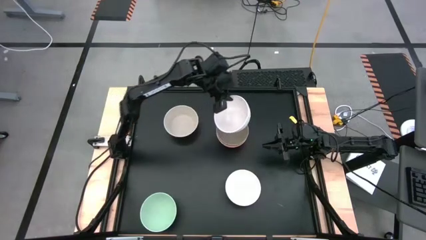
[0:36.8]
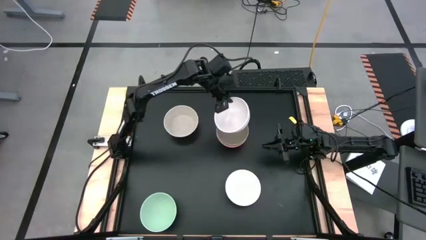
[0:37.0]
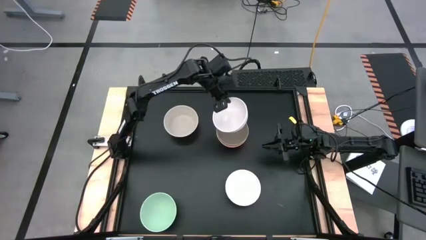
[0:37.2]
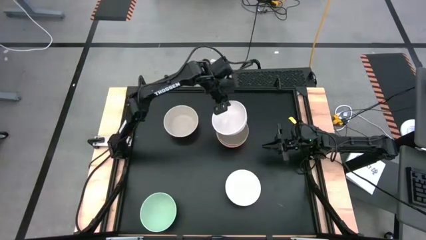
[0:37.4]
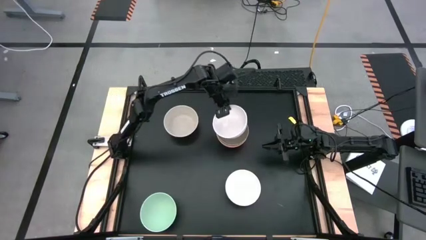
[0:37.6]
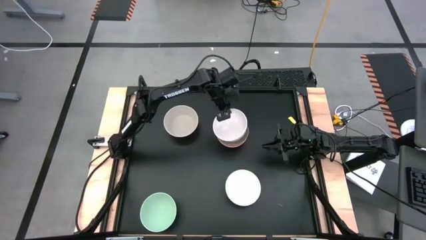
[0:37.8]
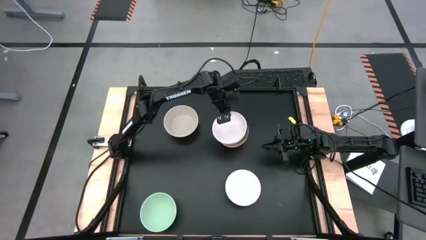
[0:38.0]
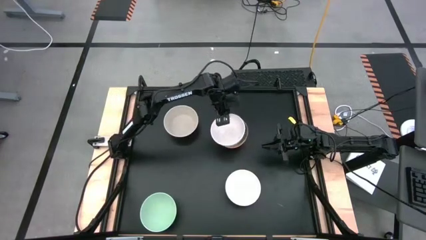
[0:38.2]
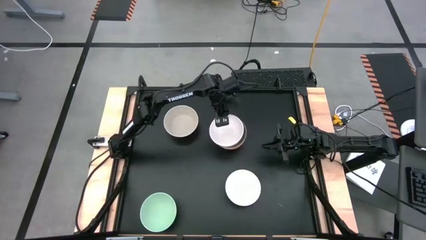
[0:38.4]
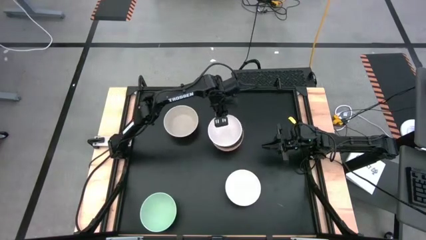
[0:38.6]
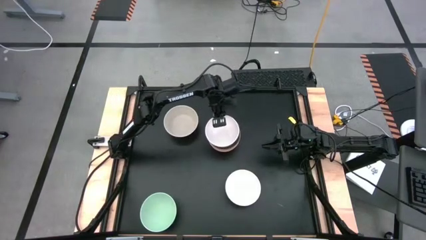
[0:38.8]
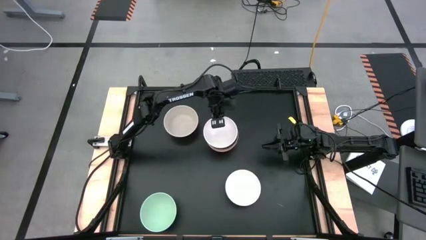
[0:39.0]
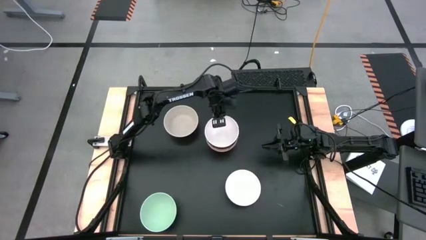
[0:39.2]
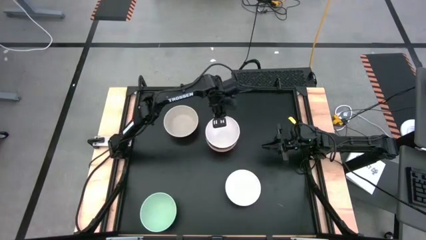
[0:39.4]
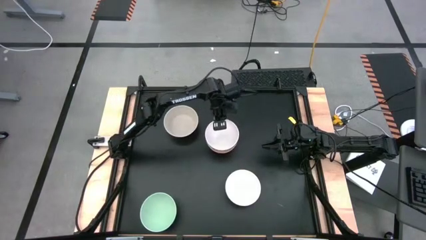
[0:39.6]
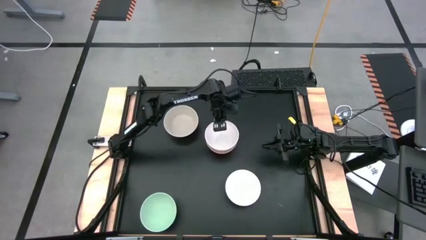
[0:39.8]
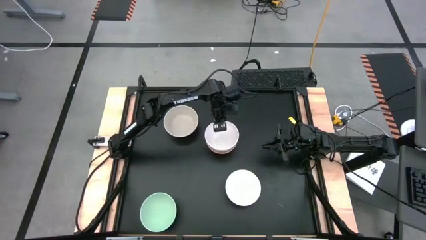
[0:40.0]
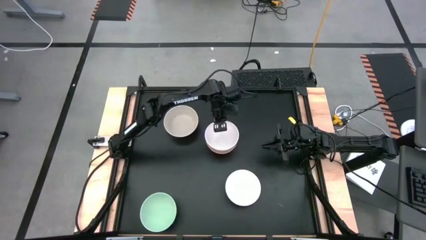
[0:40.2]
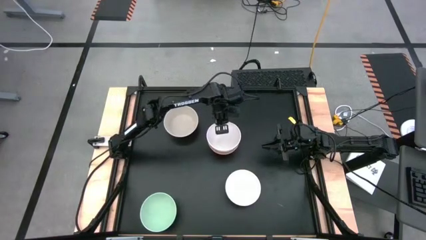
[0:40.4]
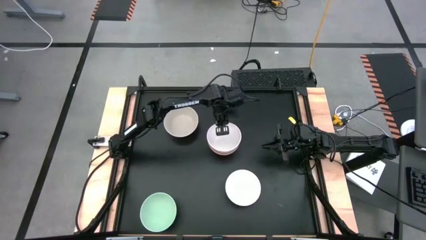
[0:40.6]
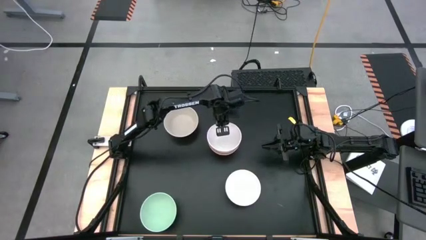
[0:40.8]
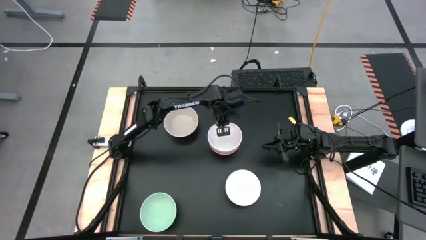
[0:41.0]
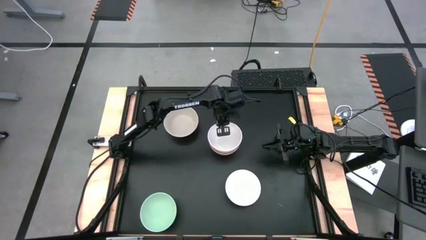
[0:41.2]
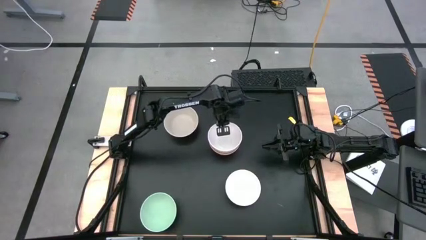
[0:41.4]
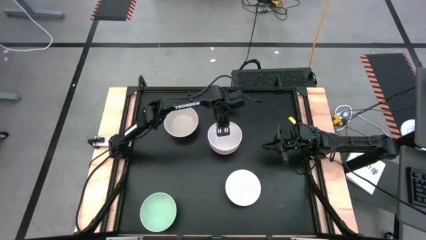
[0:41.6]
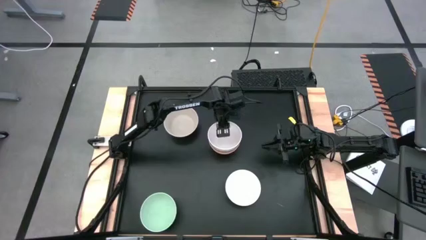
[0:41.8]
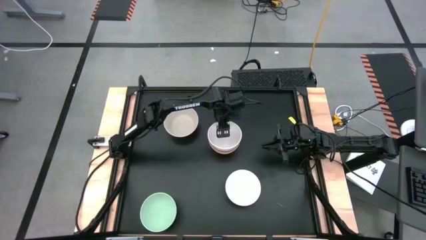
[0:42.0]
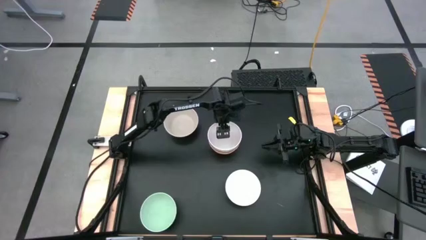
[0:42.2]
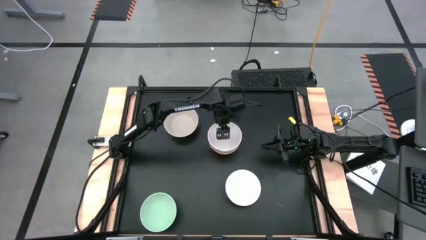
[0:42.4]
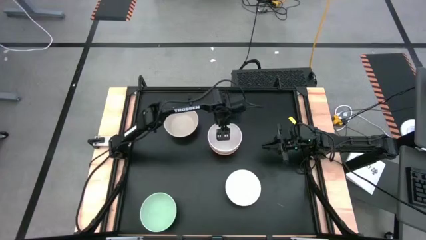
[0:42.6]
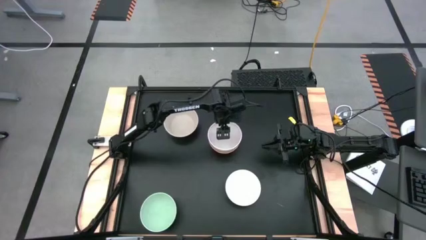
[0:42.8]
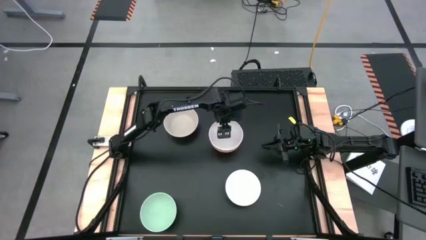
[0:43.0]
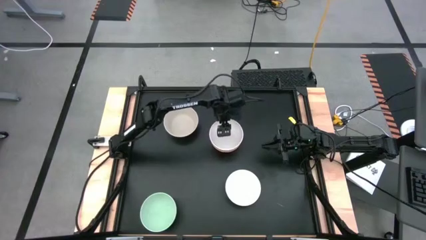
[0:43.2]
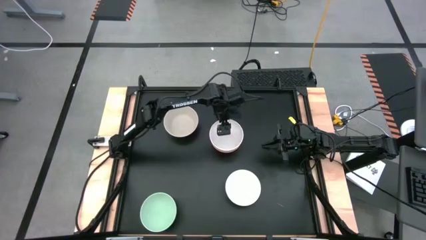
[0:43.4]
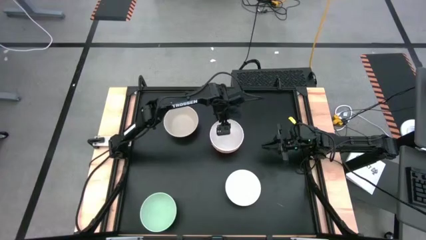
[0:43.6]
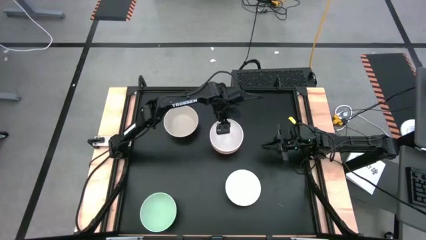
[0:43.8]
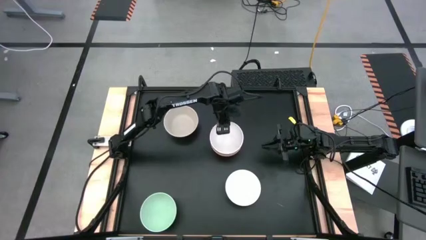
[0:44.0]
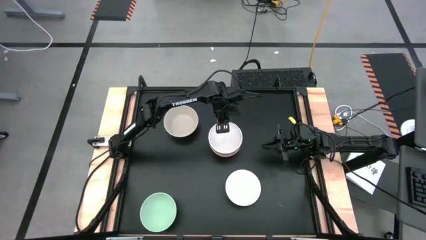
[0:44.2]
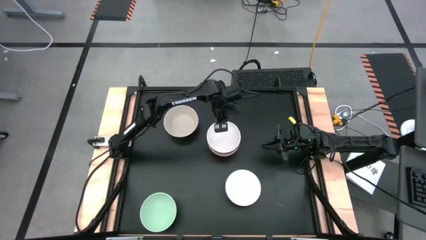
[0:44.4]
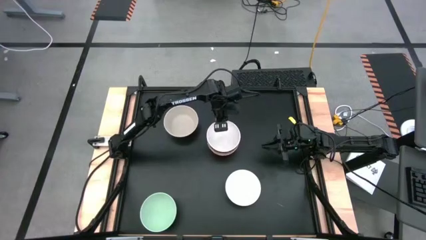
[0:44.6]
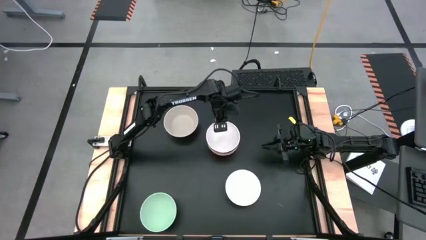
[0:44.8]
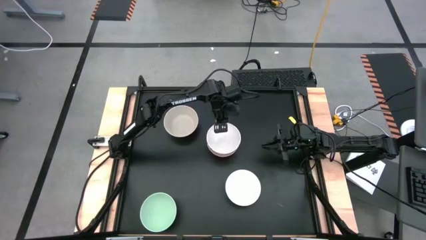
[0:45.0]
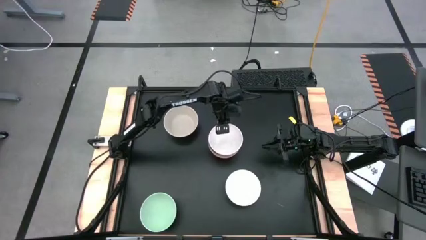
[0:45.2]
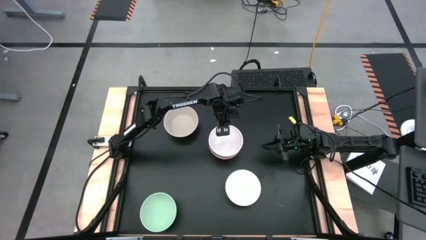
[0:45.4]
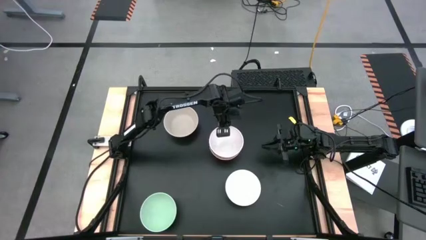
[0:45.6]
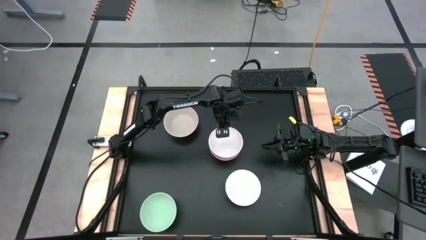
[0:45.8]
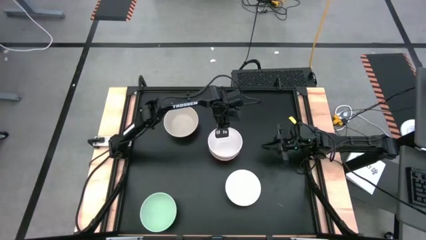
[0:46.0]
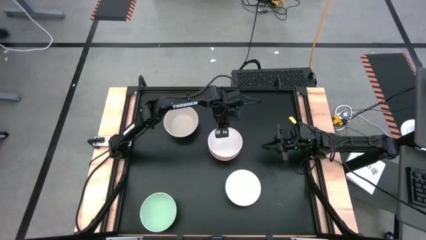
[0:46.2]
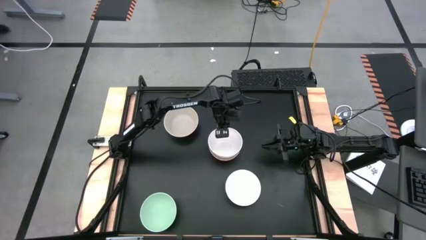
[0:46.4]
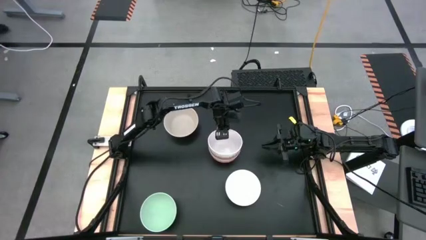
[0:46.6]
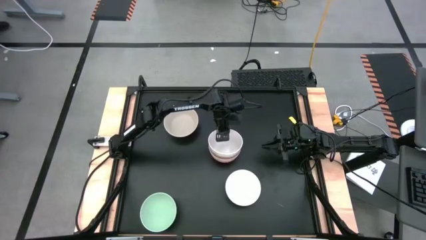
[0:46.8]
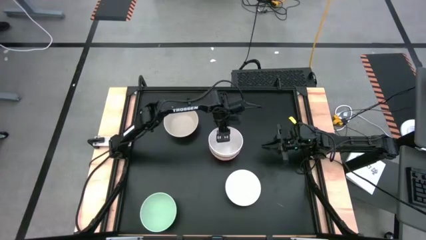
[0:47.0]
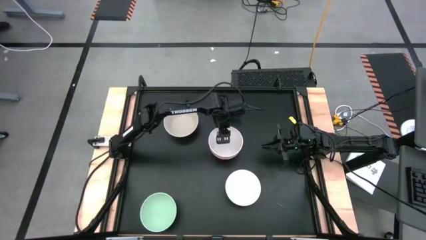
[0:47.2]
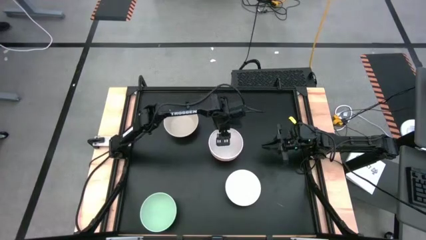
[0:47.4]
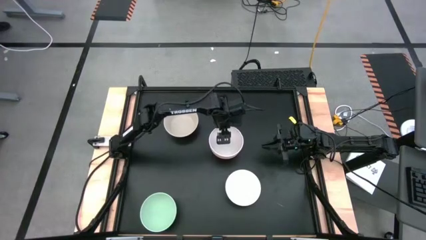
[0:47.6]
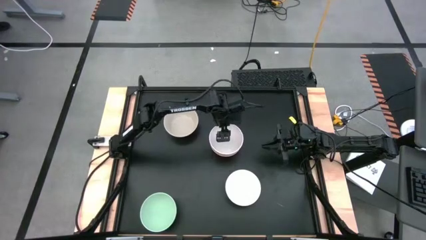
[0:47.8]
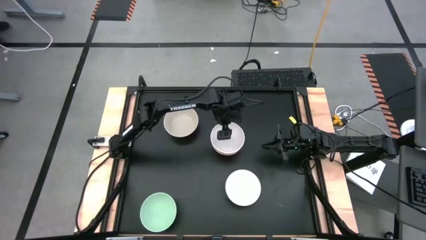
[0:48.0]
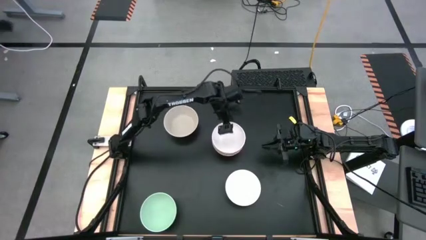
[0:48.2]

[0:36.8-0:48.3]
Task: Nest bowls inside each other
Stack the left white bowl on top of the brown bowl

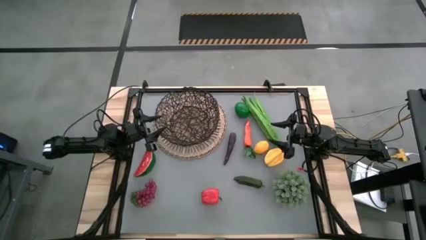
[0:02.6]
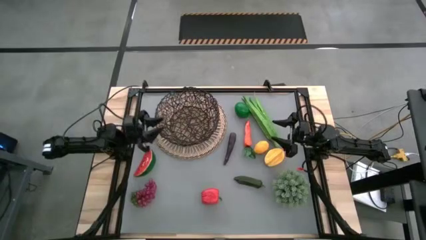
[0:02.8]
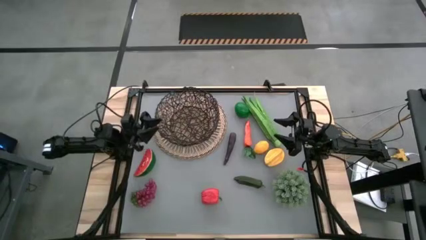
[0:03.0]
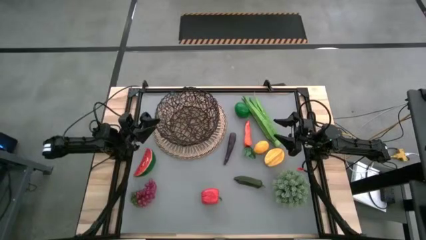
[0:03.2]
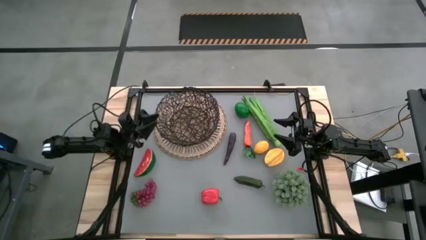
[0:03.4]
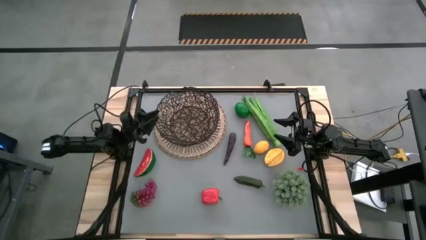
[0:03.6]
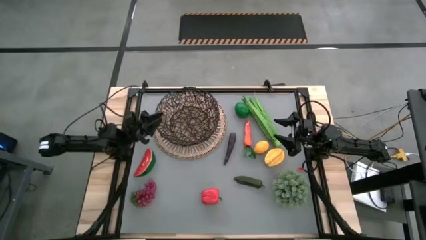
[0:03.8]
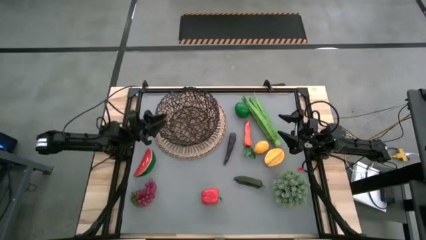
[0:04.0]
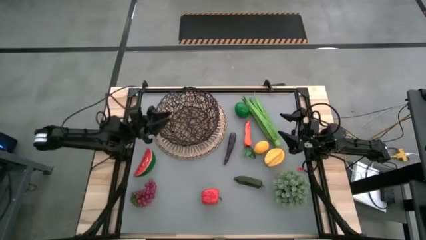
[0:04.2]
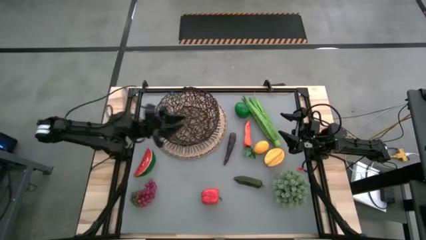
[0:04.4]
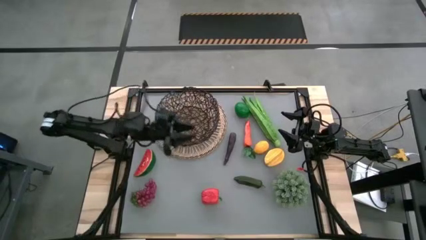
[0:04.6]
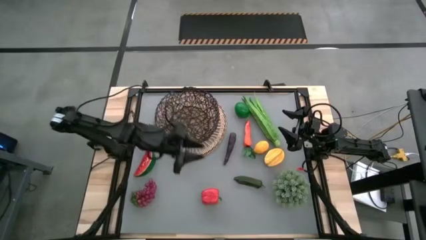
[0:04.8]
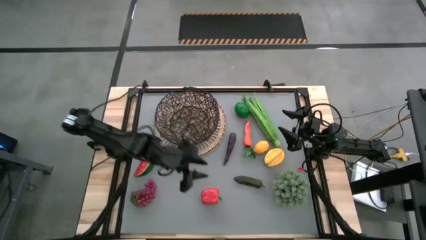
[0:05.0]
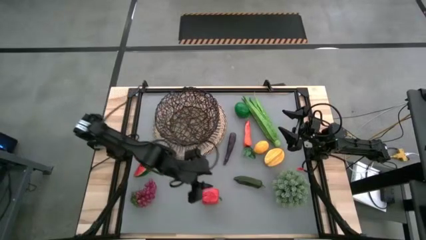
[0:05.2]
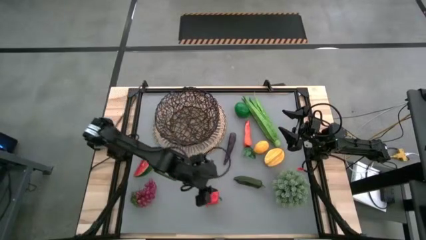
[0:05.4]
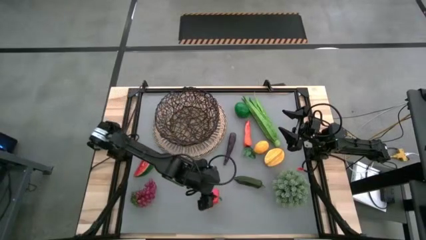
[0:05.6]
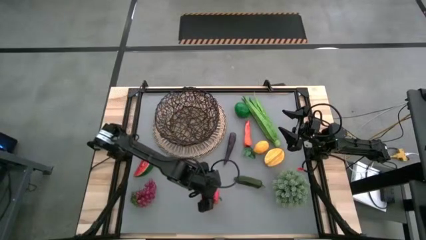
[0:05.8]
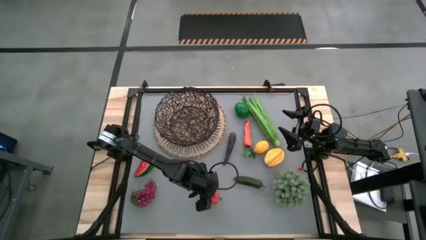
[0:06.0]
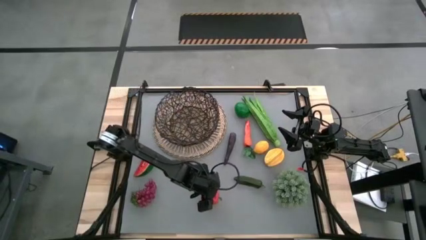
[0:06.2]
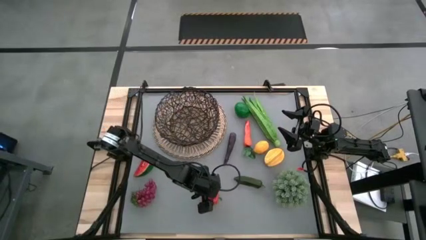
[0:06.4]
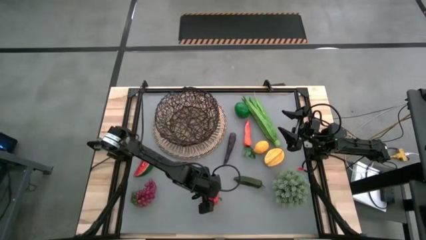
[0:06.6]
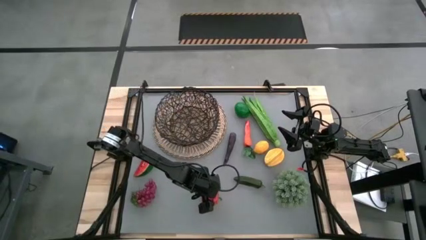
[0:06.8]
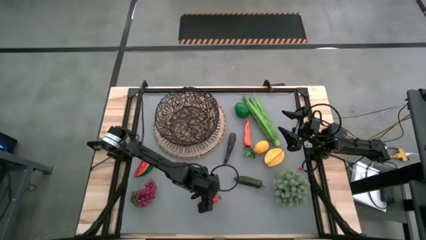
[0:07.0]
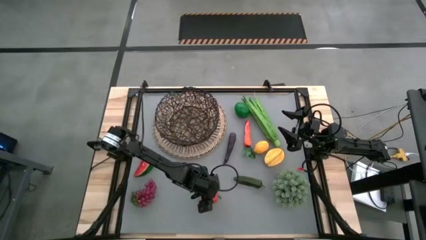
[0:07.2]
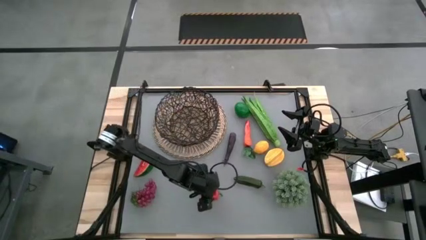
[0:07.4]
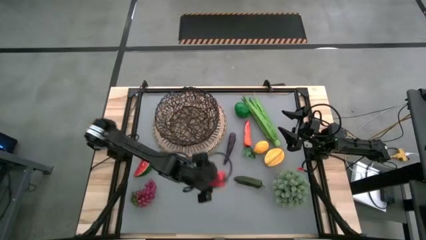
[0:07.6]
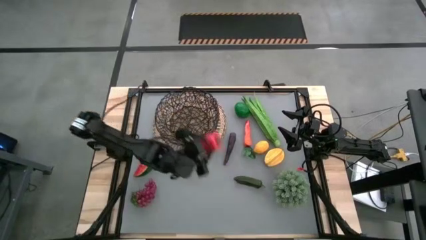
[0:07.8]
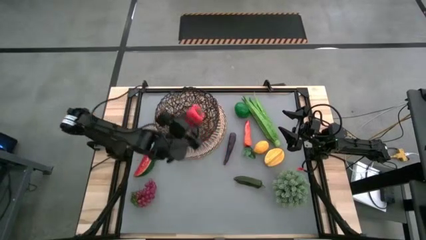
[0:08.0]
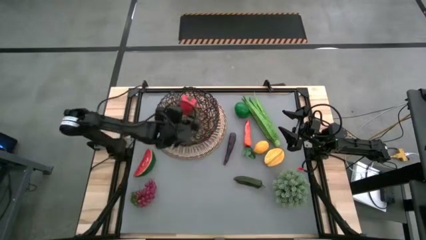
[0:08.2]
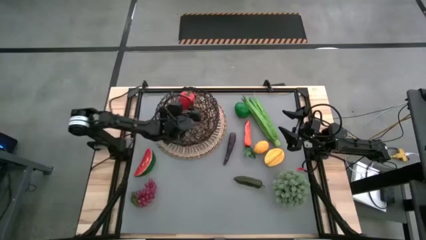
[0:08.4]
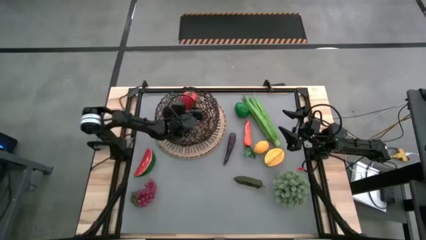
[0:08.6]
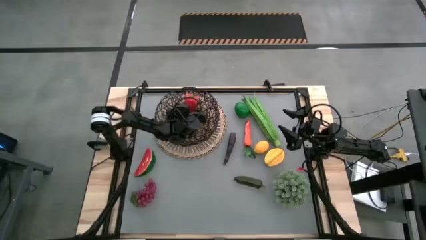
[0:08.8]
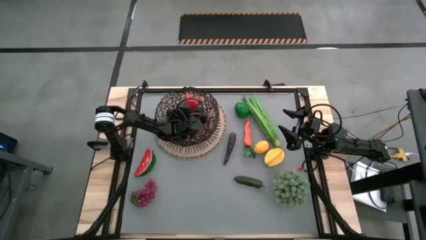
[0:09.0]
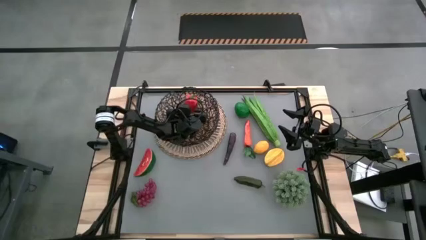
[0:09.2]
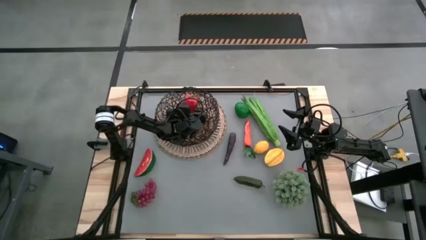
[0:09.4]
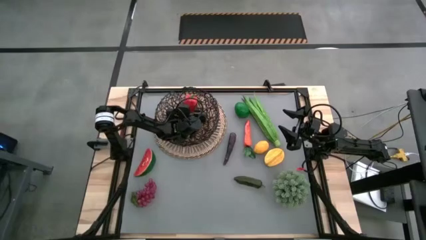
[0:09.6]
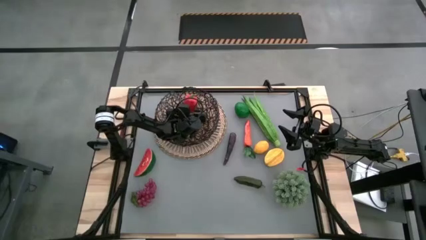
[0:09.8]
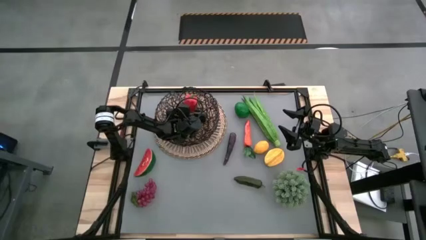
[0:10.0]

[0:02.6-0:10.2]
Task: Build produce basket
Put the red bell pepper into the black wire basket
